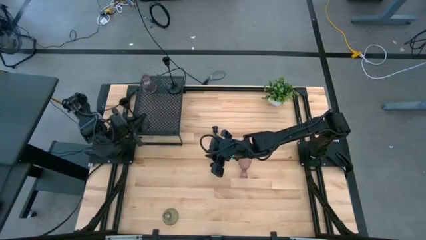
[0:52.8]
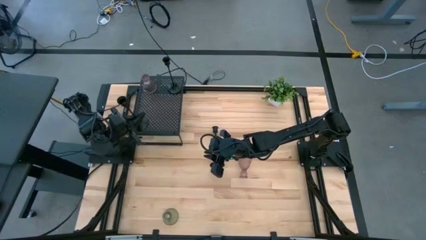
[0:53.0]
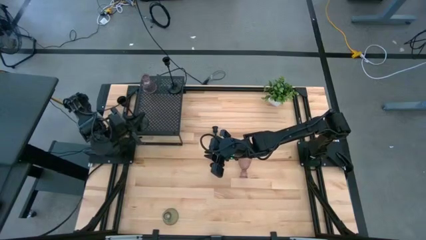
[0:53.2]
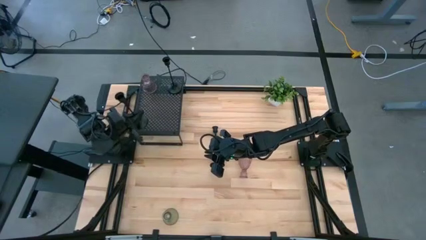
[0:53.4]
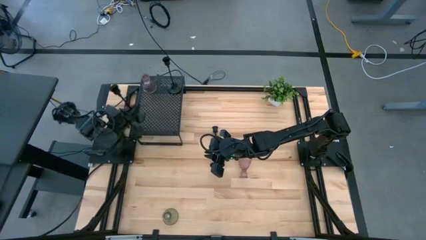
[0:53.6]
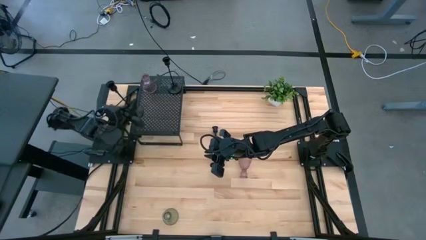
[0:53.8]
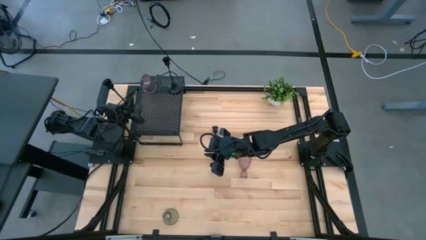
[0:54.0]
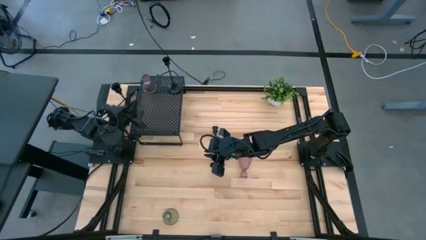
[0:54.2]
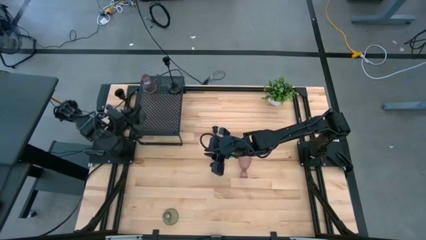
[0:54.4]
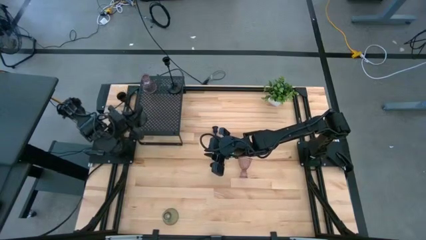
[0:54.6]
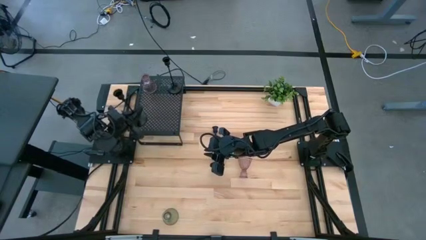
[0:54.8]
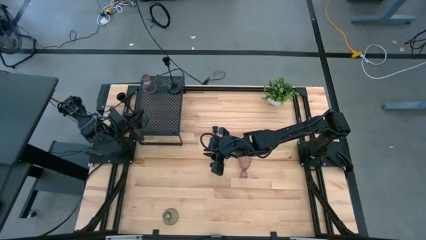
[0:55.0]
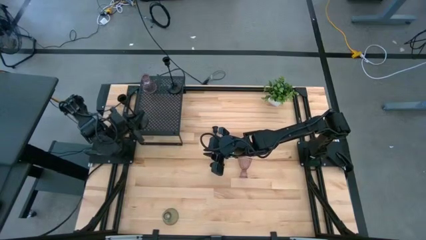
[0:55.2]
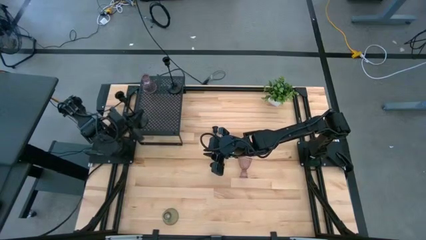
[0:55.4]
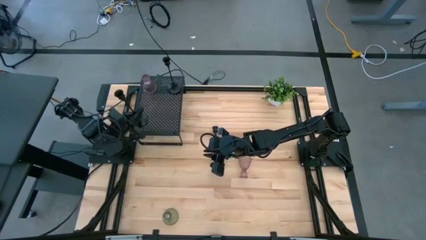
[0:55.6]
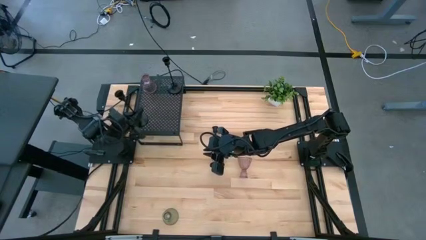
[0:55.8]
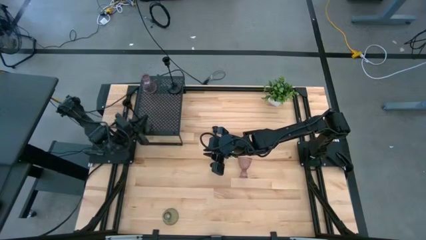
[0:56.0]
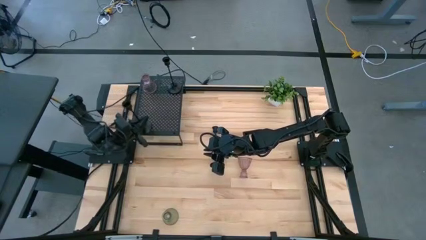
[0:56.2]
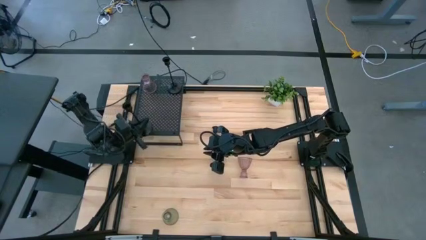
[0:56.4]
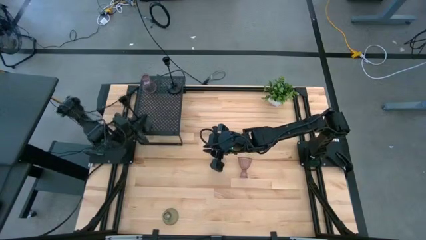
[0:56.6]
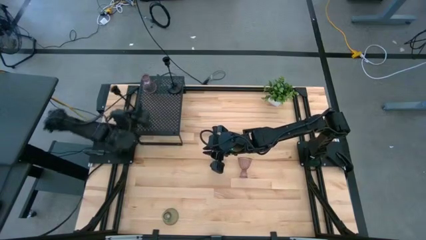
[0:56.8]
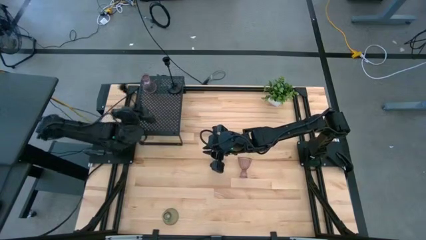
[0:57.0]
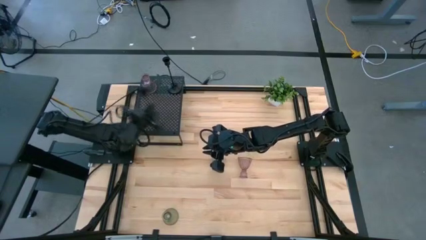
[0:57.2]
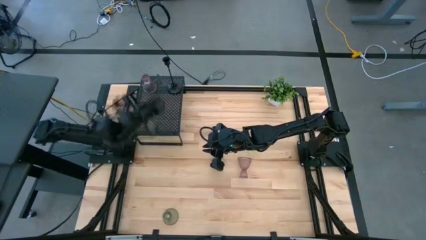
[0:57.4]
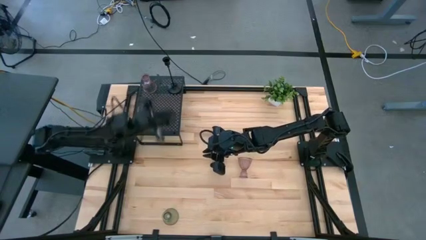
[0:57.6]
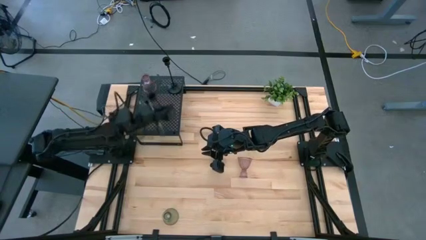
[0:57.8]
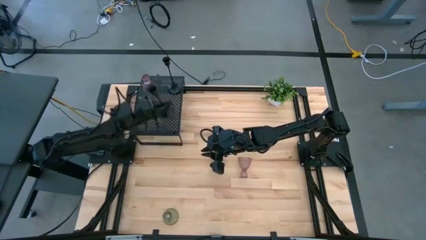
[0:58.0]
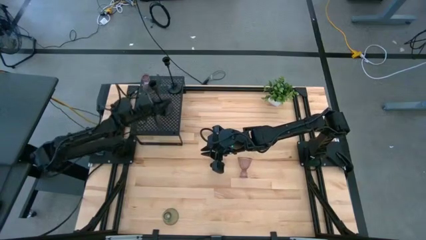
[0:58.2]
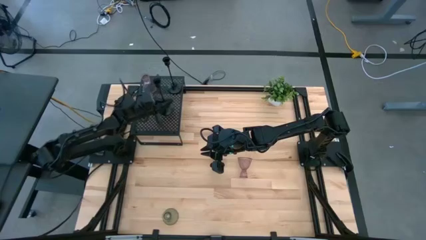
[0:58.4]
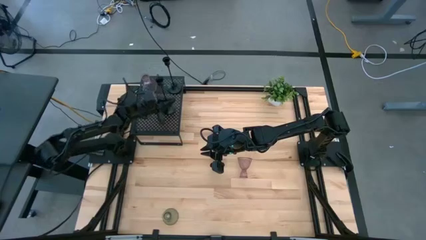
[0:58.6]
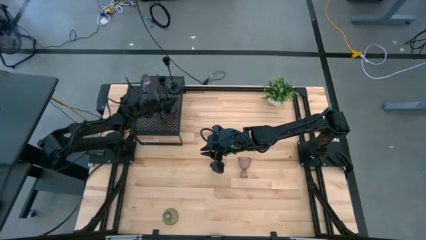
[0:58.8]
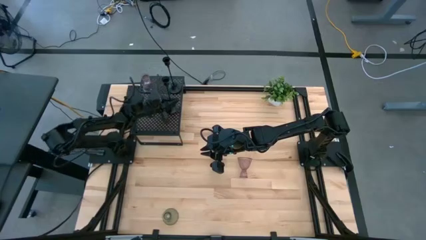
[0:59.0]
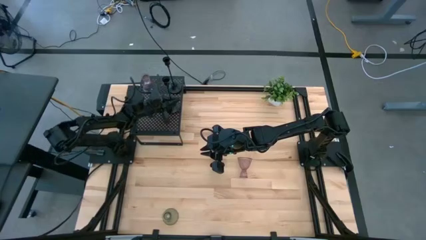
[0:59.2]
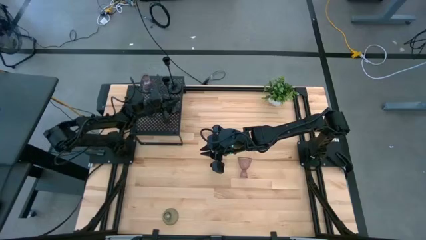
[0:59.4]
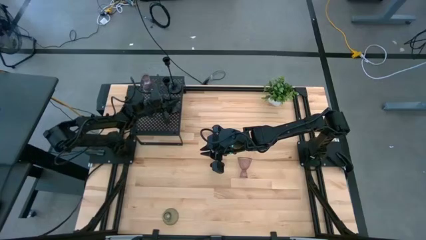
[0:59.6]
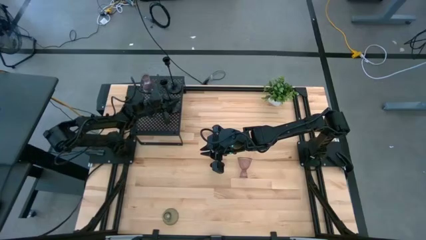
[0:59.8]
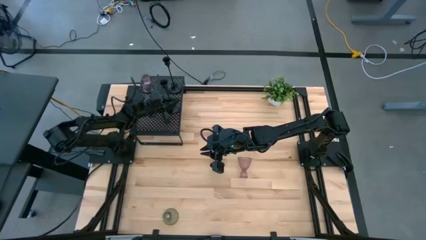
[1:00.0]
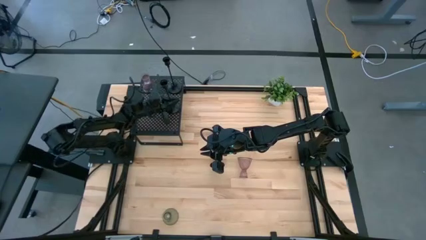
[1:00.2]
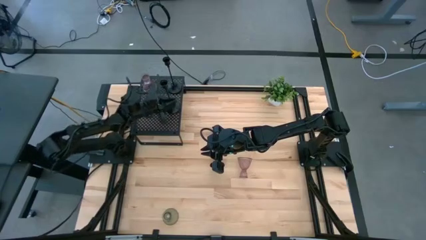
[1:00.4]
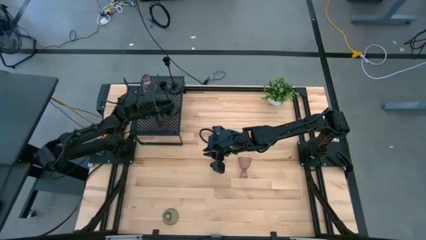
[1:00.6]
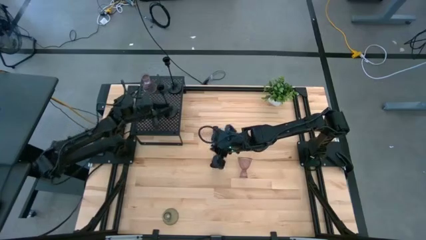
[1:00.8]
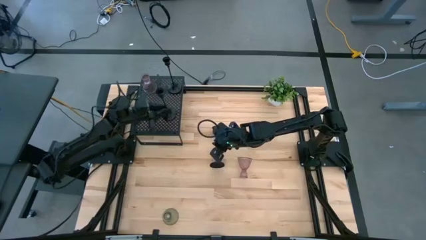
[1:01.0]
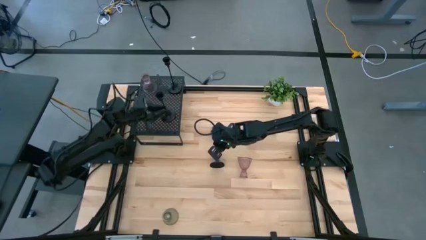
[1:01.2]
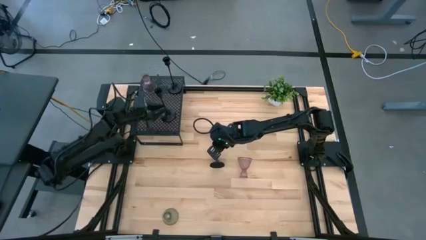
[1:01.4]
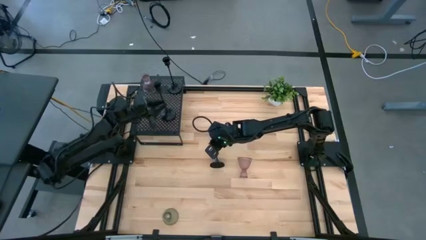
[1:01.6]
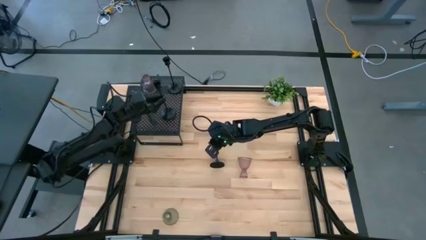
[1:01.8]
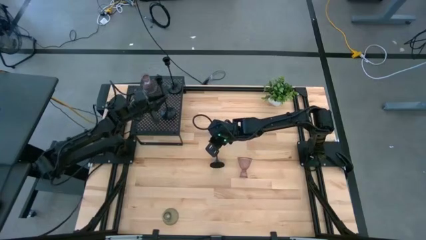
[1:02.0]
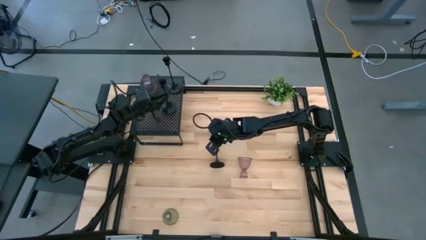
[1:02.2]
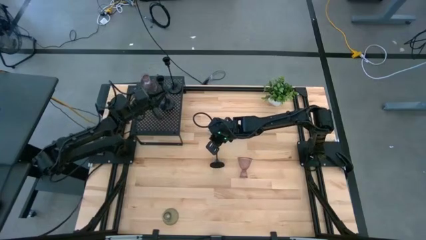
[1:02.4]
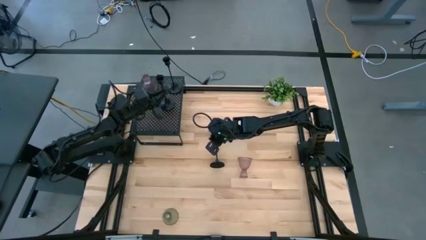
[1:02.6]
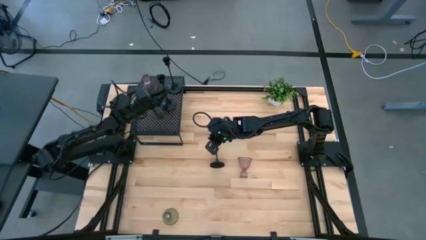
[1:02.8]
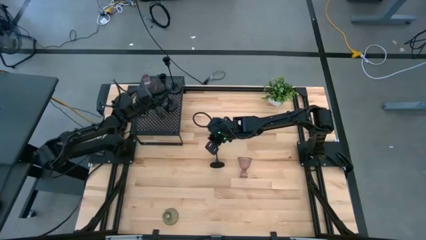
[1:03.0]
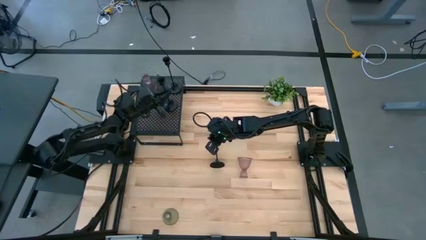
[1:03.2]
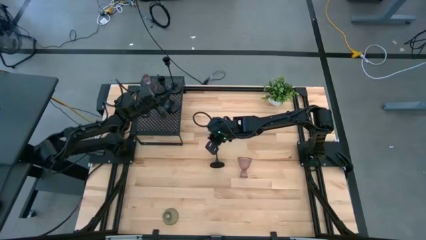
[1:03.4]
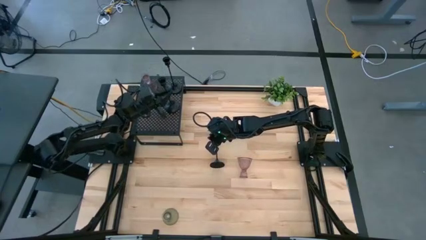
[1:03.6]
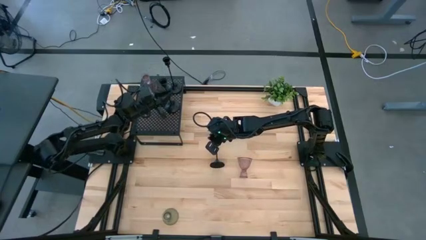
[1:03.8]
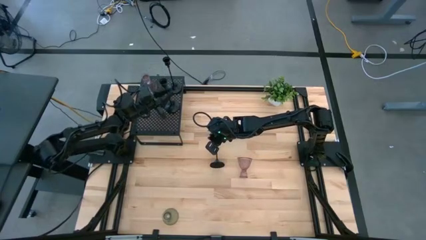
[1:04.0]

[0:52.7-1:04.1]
Task: Pick & Place candle stick holders
Align the right black candle holder with the other black candle holder on the shelf

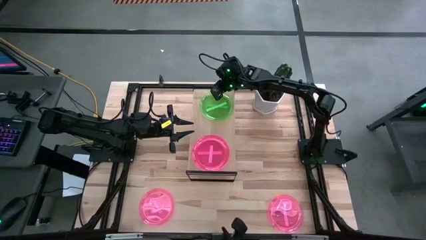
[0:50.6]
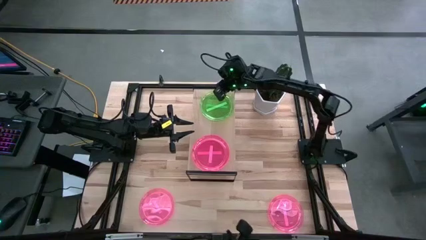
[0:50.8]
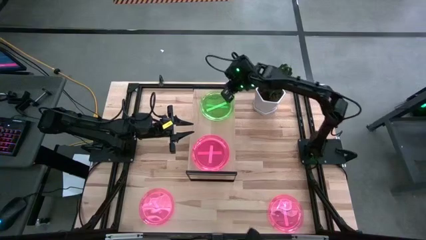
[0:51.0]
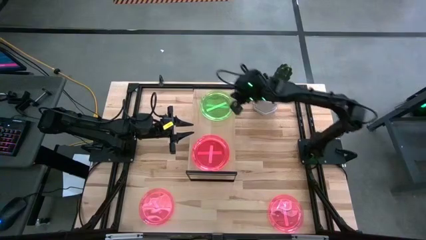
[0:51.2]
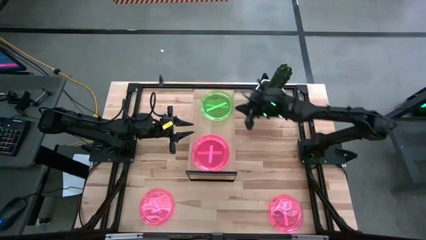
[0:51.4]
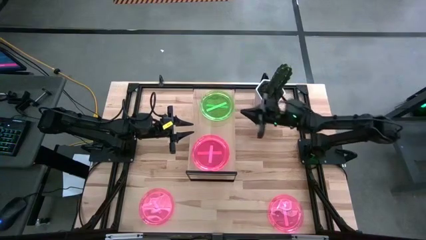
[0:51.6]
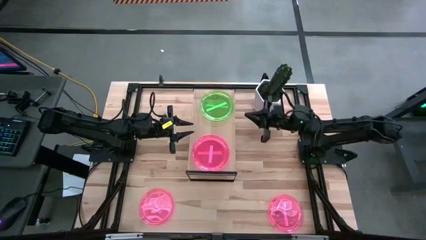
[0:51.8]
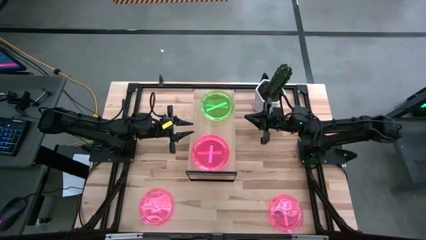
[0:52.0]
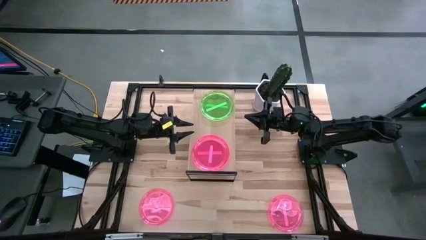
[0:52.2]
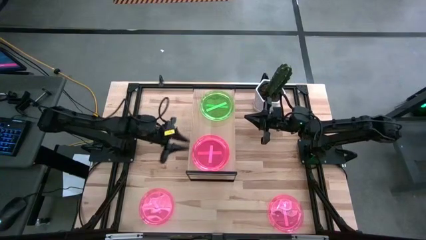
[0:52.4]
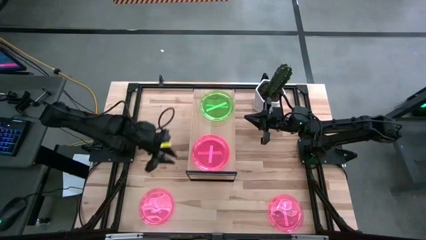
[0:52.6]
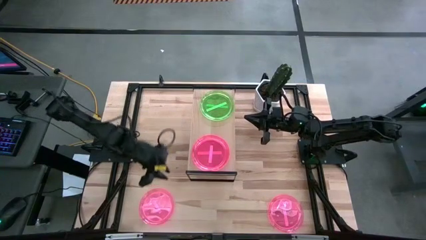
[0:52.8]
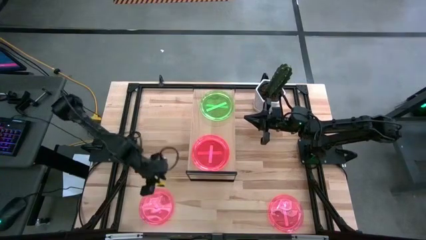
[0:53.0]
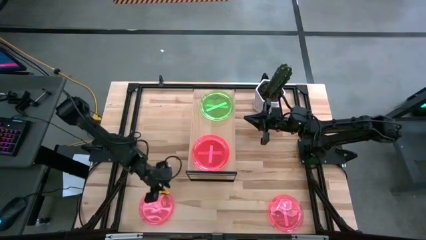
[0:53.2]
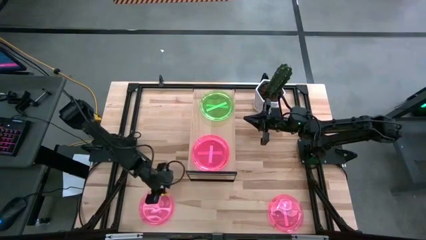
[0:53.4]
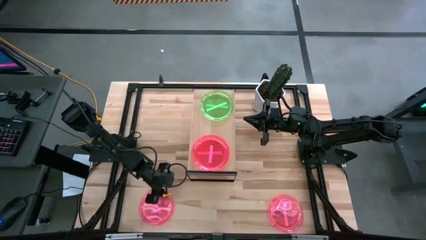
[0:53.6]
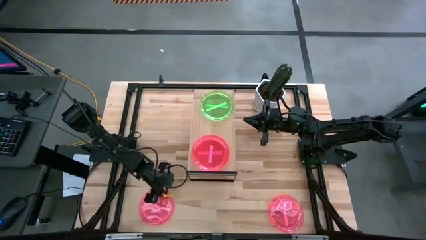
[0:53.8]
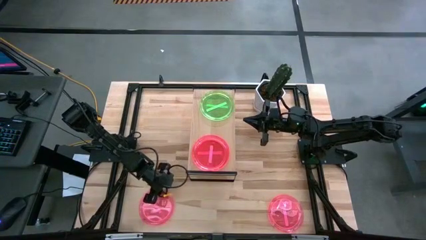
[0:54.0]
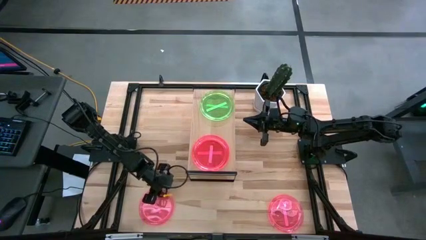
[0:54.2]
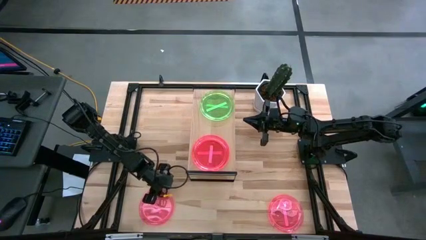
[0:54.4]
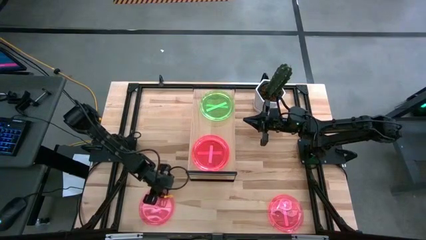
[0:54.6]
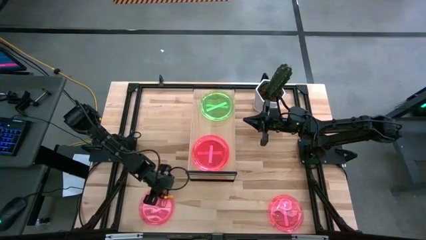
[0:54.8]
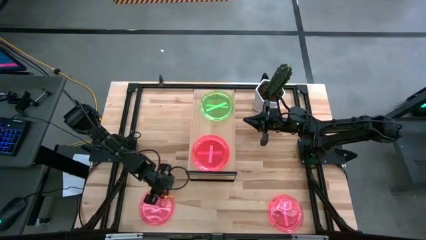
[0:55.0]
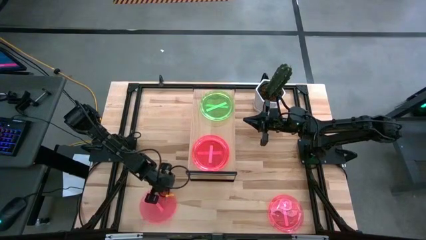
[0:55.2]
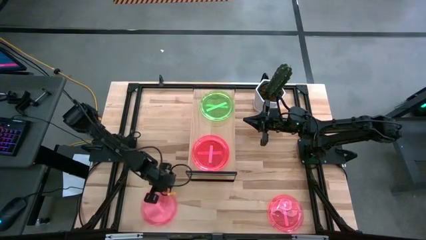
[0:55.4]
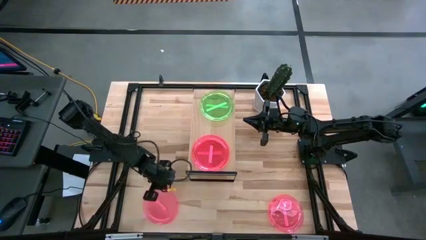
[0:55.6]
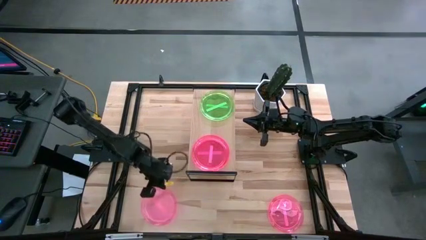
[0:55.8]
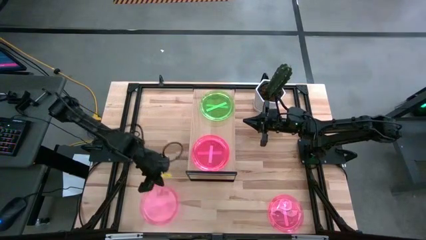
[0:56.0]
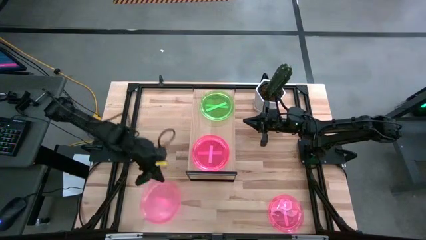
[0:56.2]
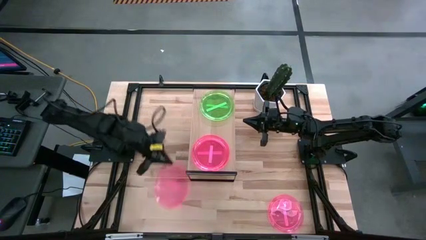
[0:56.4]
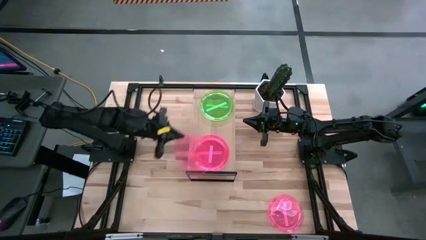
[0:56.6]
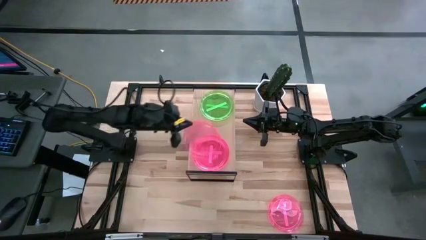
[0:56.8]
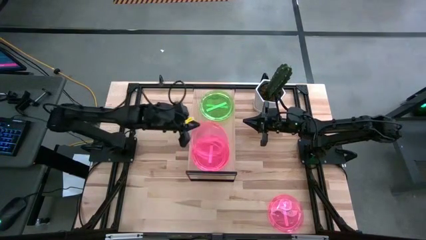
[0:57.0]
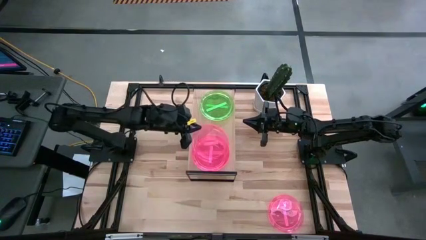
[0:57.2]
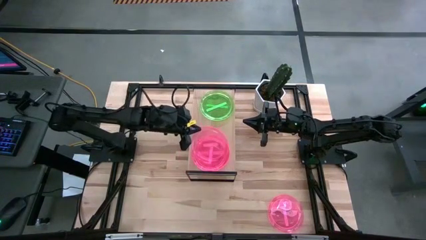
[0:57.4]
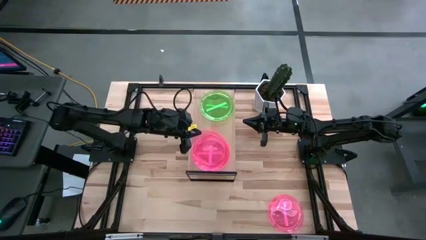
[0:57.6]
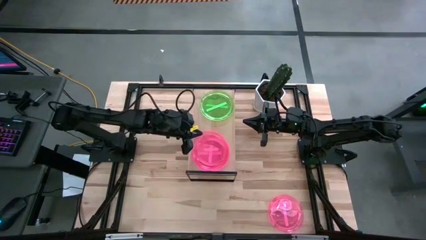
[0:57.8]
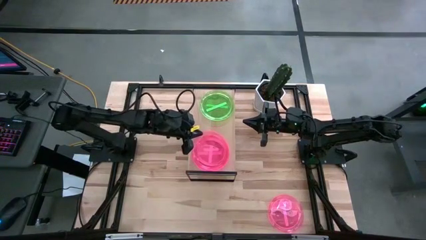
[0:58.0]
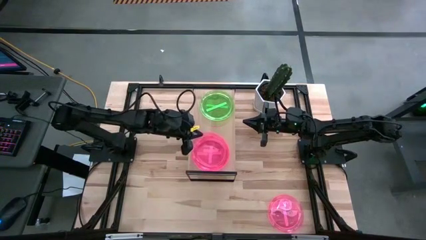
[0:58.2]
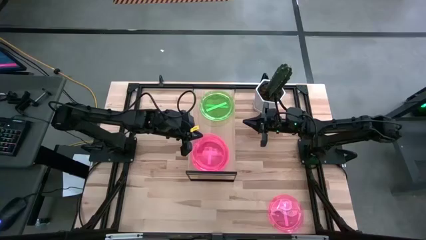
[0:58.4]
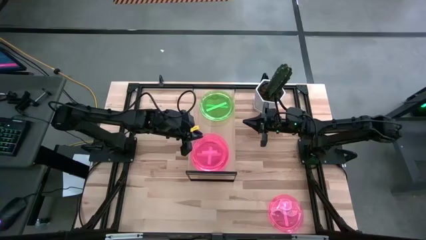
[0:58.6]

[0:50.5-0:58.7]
Task: Place and stack plates onto a shelf
Stack the pink plate on top of the pink plate on the shelf
